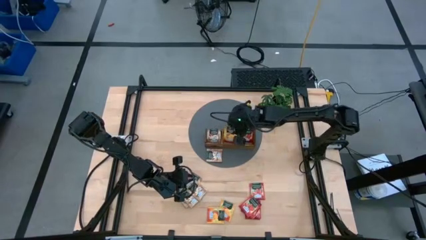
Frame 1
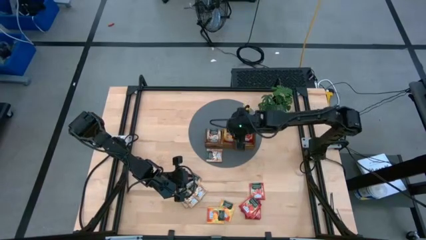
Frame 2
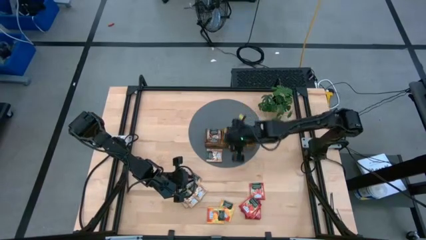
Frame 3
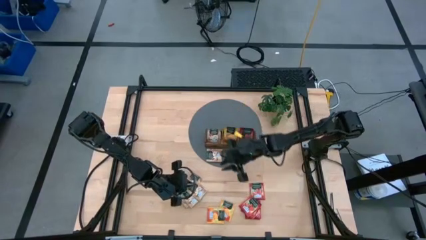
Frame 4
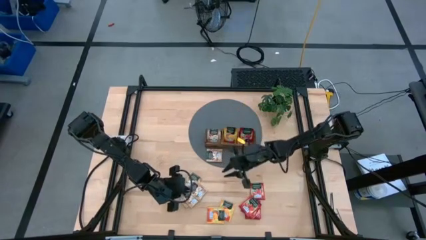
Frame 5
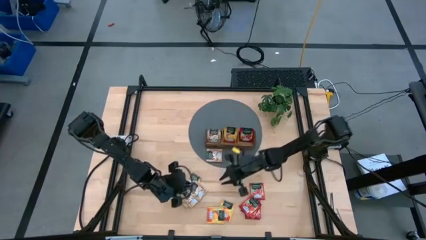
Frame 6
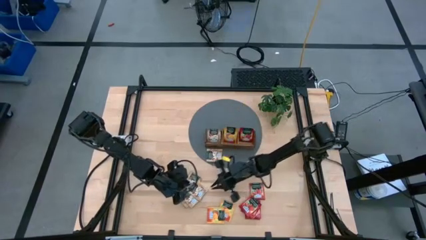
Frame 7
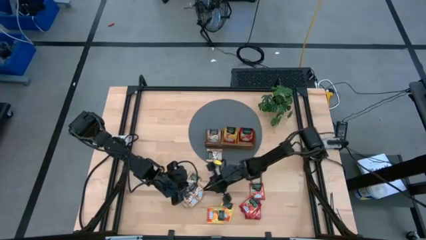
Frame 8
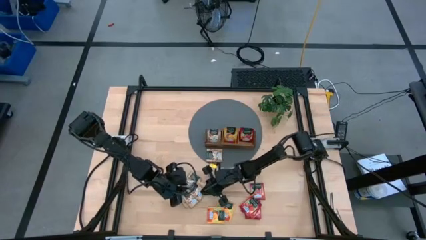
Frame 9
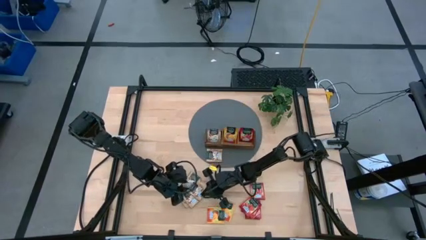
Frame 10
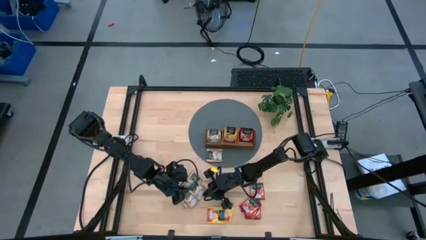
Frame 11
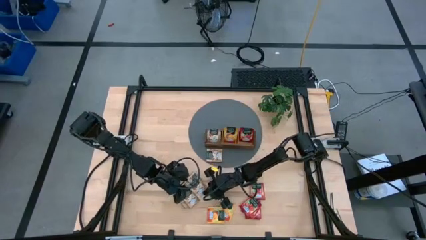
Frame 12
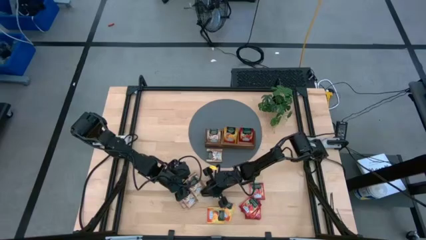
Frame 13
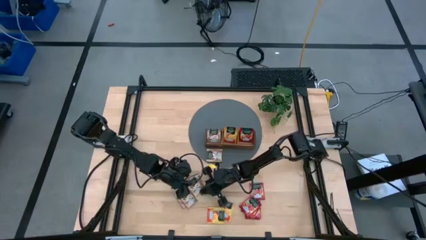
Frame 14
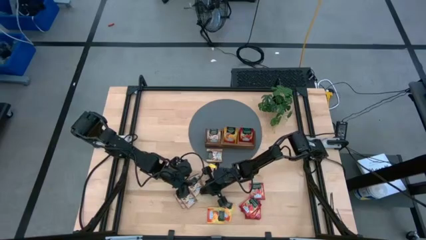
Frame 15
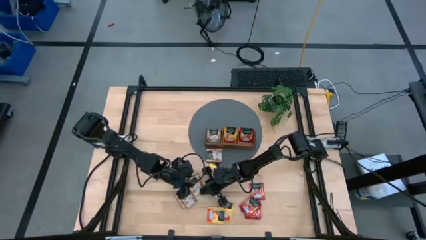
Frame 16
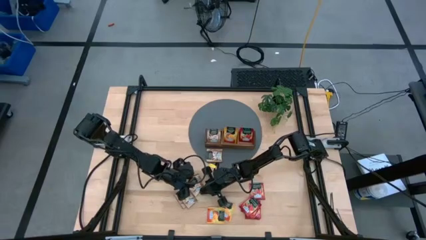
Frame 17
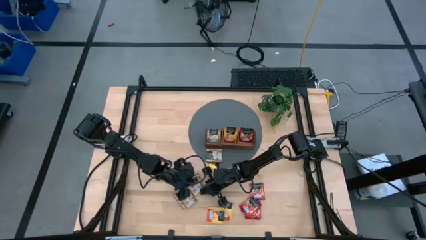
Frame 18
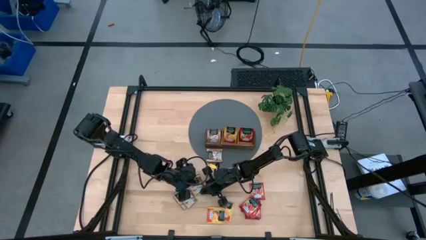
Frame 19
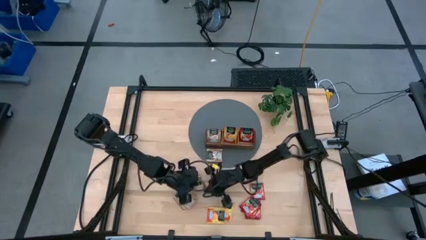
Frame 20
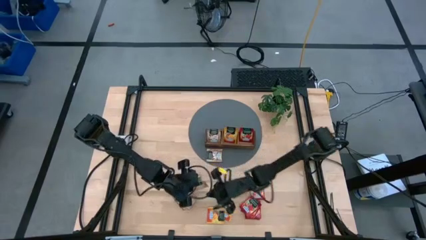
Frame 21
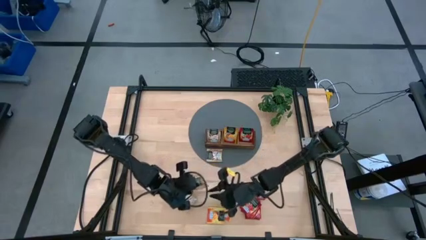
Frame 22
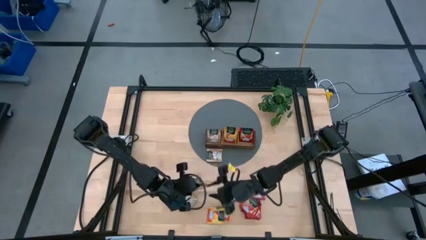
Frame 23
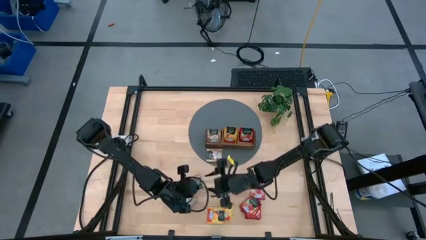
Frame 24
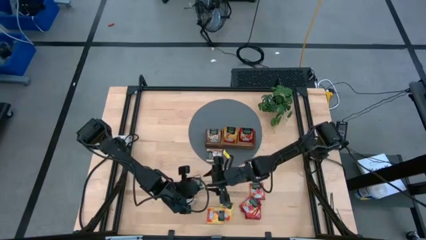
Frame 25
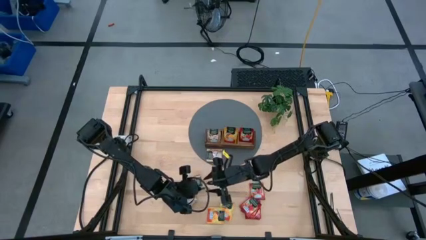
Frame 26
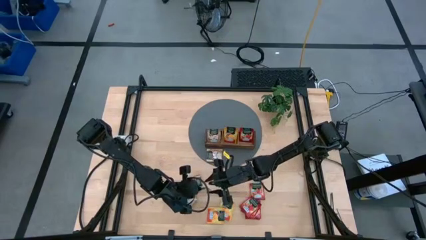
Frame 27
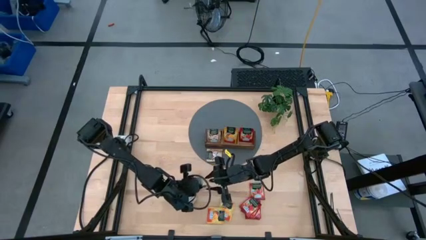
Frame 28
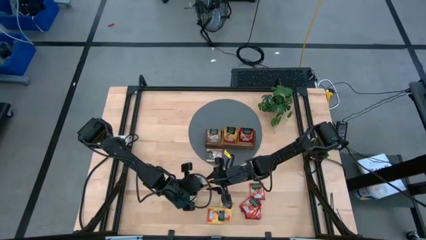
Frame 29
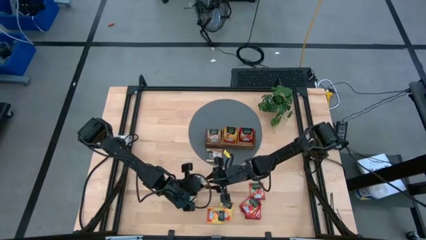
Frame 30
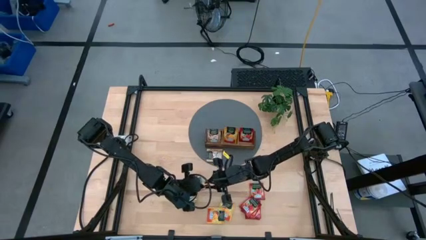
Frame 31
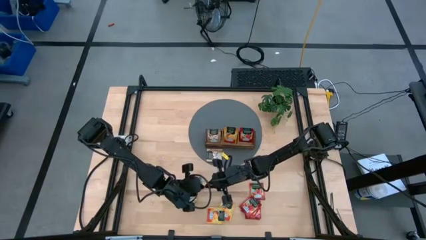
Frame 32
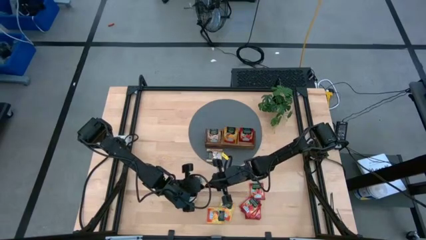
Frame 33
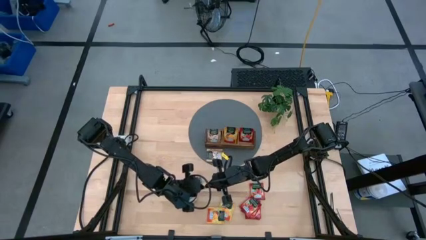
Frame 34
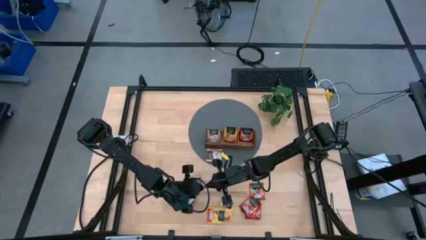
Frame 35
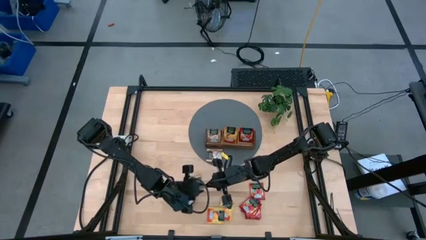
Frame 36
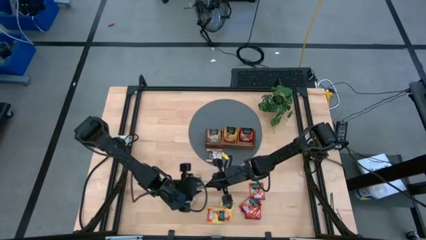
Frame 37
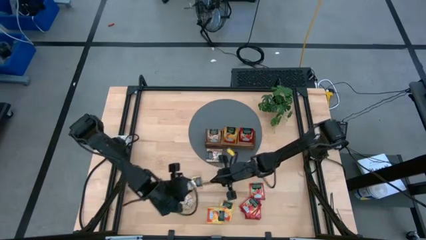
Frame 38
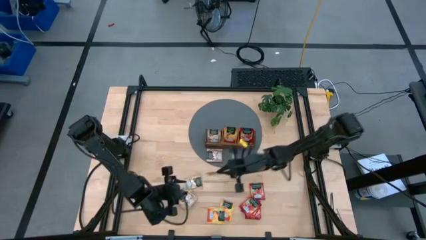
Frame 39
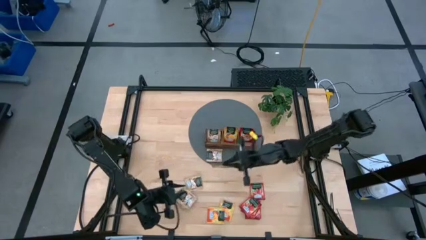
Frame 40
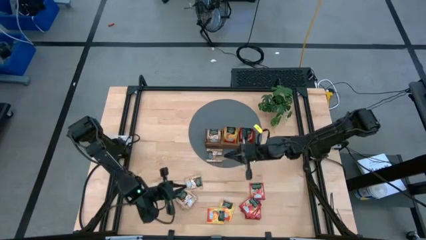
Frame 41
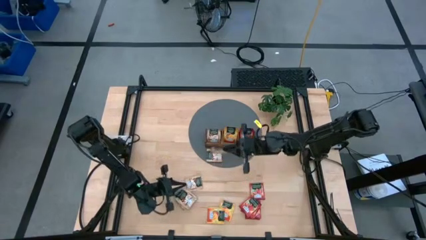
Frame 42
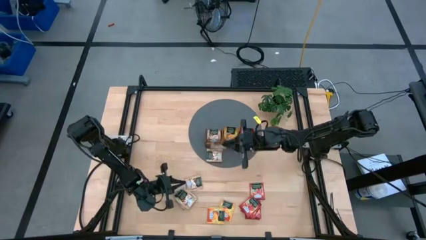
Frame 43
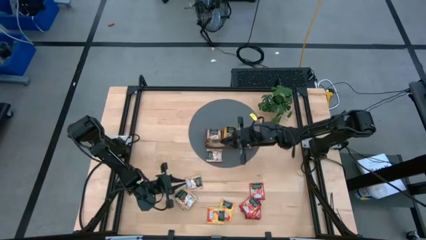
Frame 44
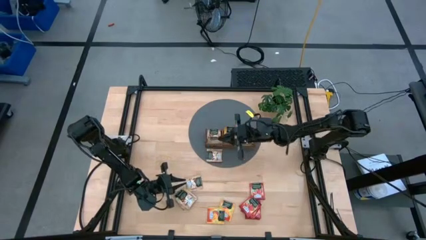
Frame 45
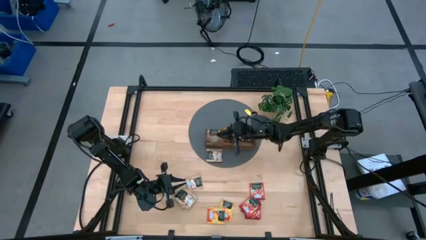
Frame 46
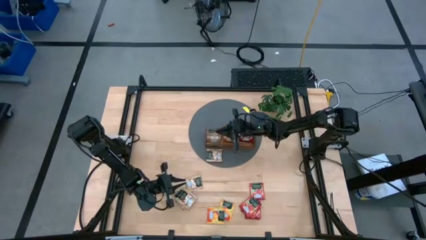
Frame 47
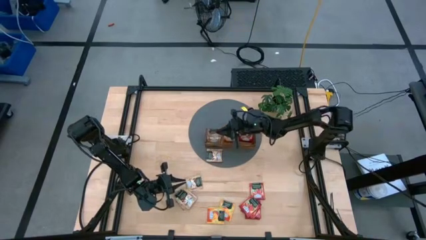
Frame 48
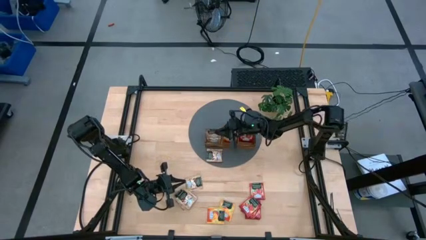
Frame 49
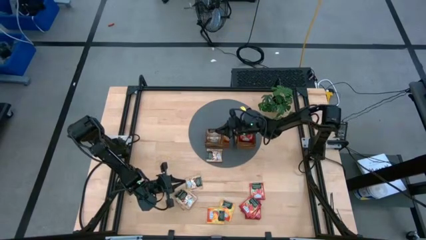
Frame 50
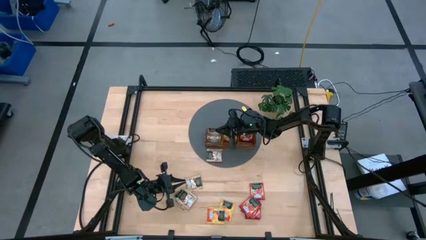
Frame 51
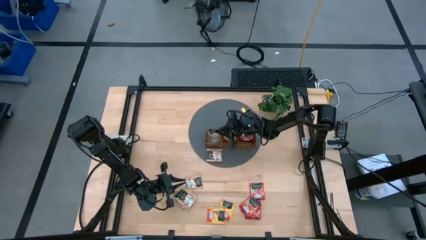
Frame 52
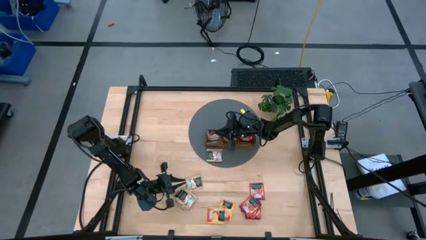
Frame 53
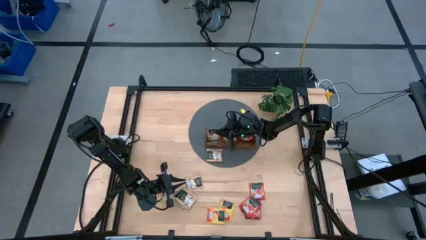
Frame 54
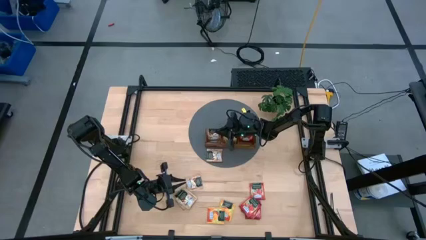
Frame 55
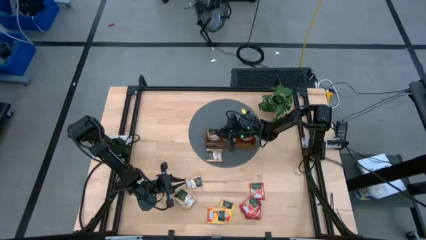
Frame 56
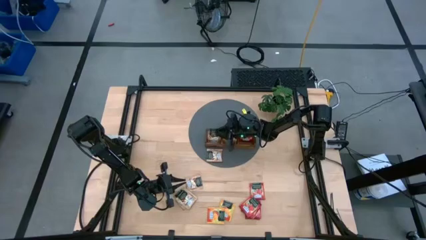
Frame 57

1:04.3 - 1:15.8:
Task: Pick & Place Tea
Put the brown tea packet into the left section of the wooden organizer
